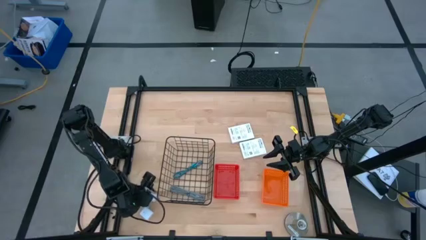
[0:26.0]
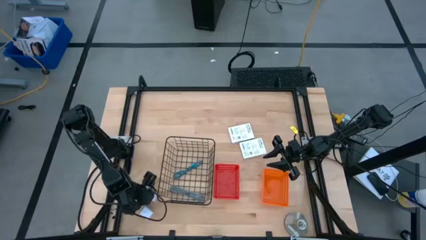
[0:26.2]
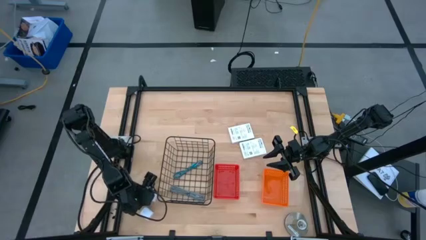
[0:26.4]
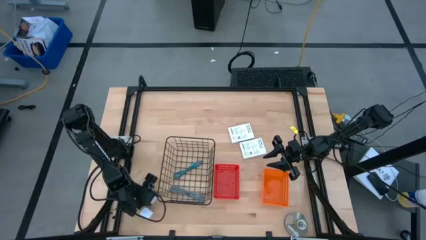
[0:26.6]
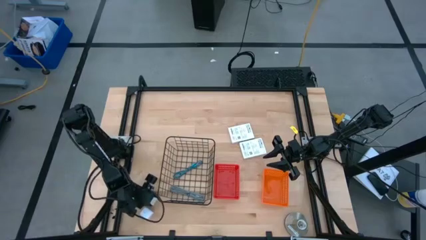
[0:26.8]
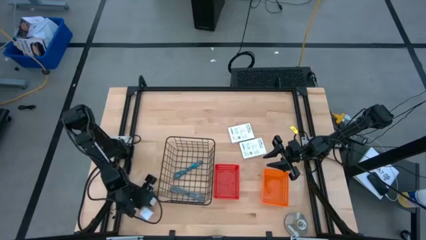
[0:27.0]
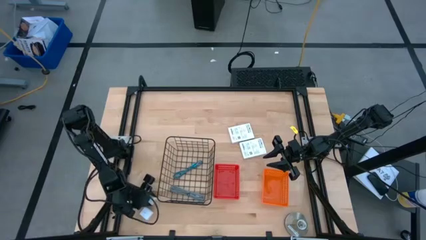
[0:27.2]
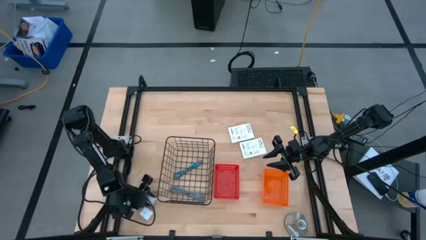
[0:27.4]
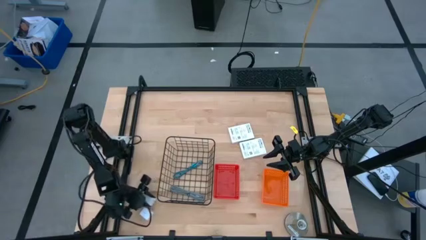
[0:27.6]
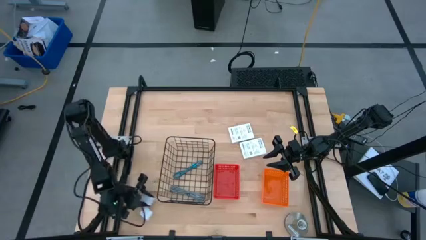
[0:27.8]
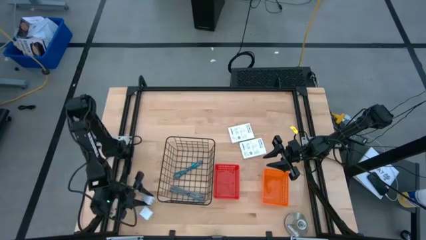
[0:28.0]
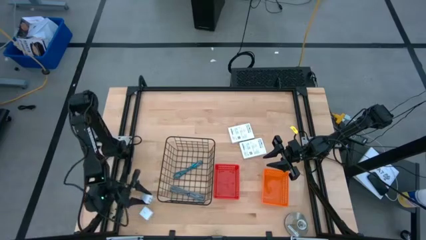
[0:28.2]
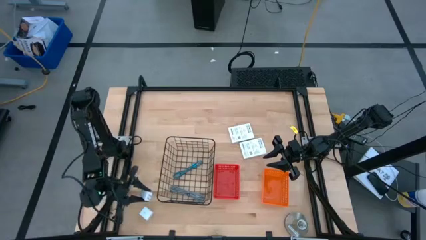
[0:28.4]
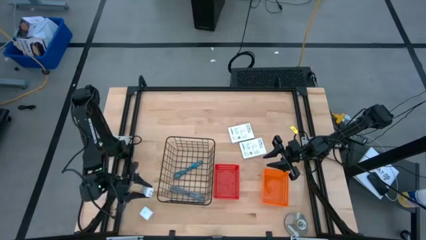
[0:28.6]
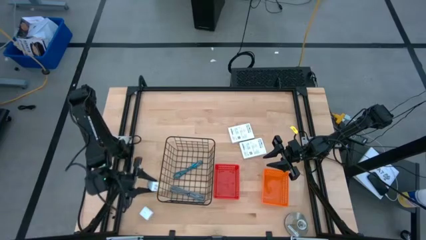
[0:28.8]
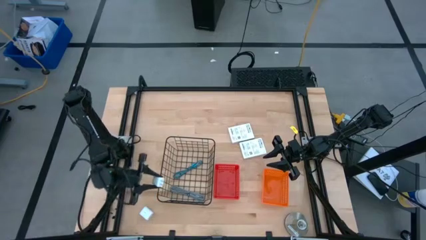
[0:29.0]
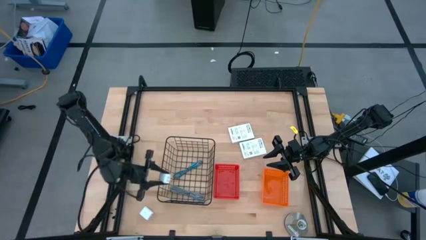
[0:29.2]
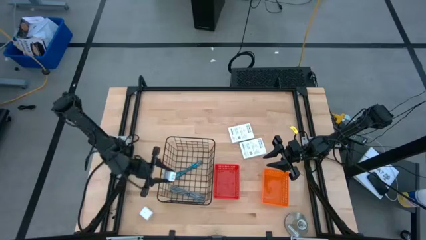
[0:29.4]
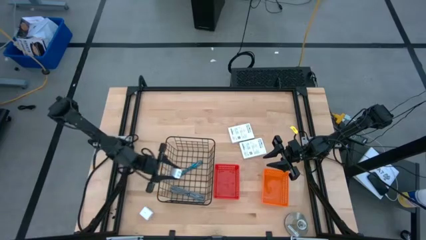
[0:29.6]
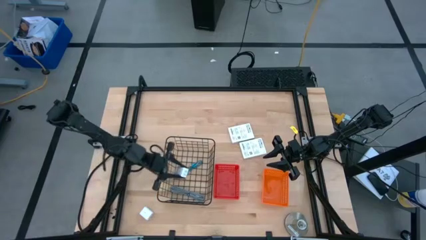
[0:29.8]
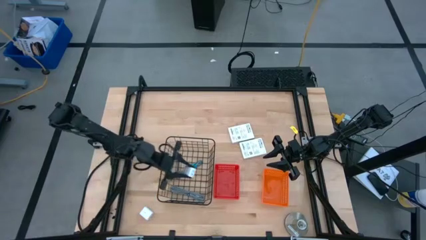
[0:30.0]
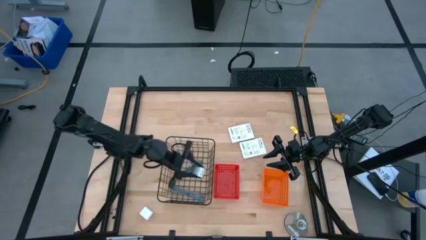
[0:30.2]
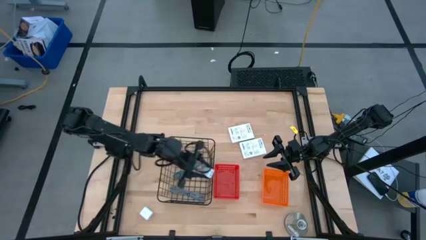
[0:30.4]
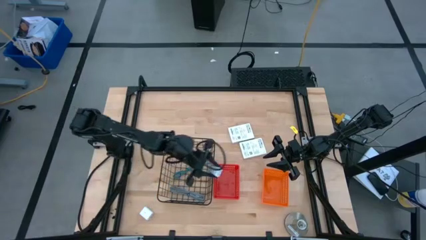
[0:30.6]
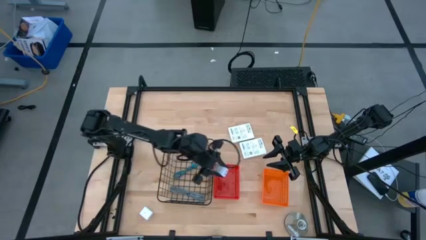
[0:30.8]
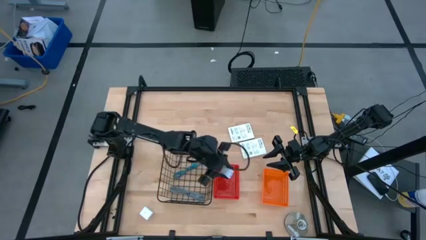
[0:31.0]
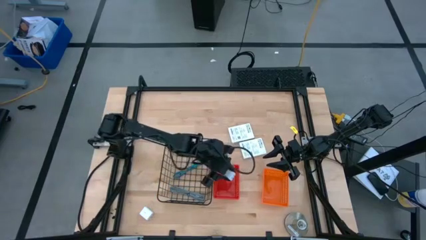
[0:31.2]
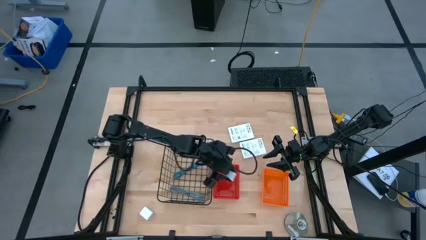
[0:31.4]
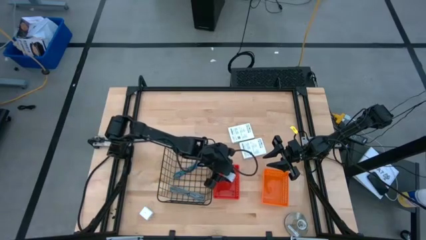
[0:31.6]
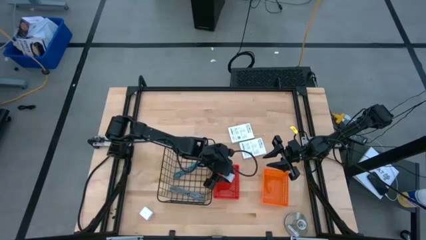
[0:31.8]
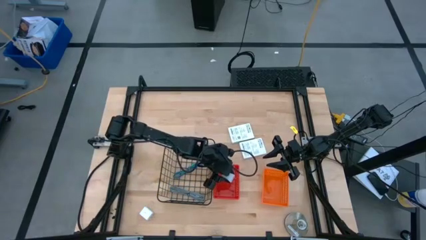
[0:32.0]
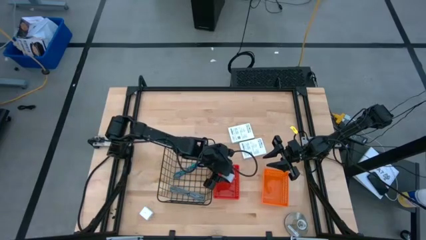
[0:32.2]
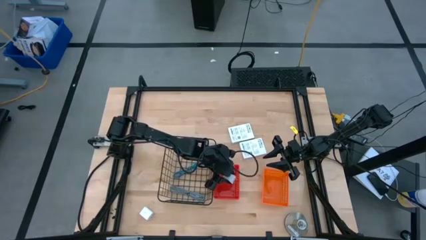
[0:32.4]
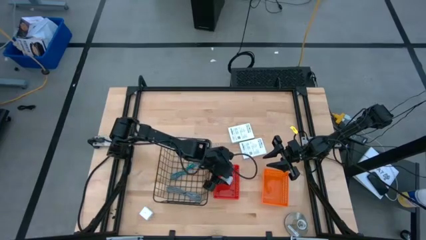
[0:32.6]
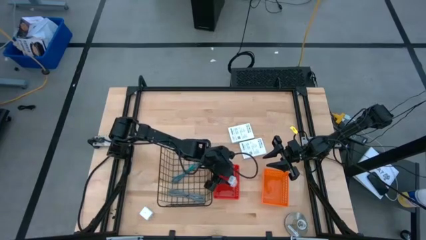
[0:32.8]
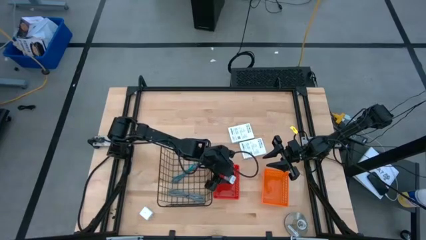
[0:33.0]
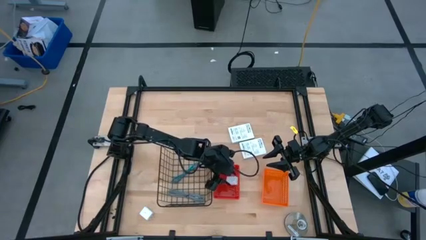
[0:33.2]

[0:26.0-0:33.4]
Task: Pick and place items into bin
Put the top white charger adapter into the red basket

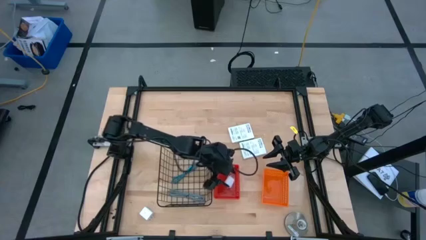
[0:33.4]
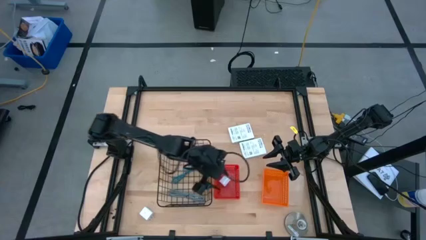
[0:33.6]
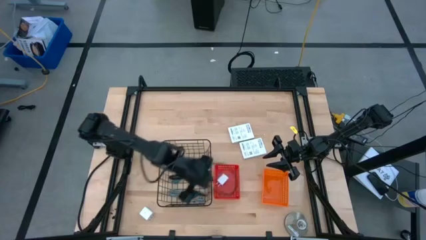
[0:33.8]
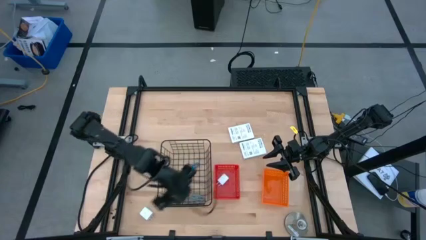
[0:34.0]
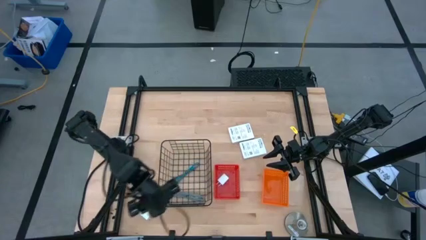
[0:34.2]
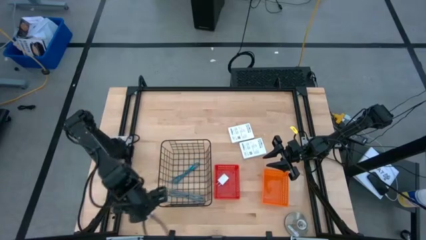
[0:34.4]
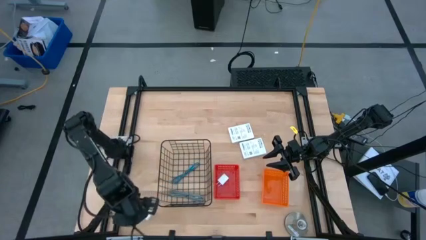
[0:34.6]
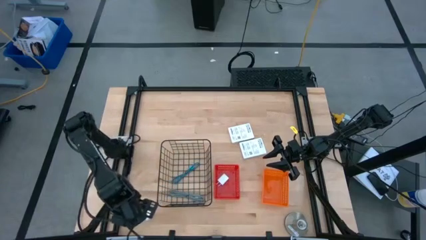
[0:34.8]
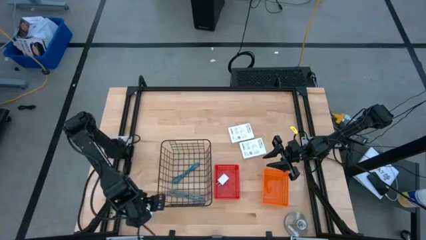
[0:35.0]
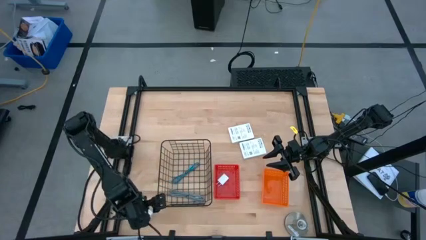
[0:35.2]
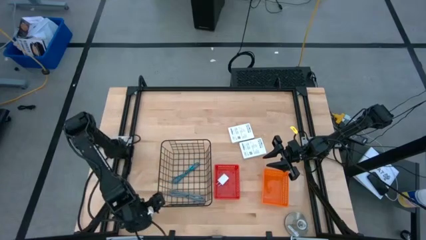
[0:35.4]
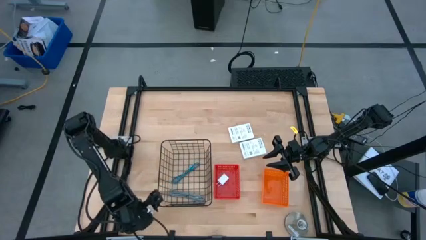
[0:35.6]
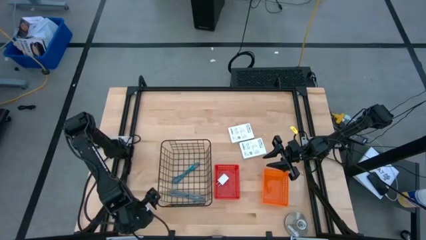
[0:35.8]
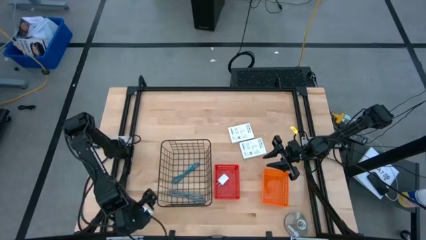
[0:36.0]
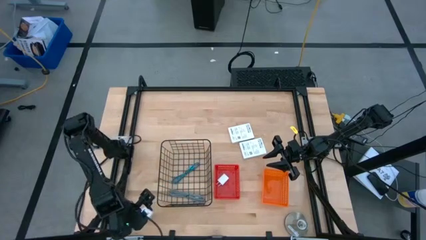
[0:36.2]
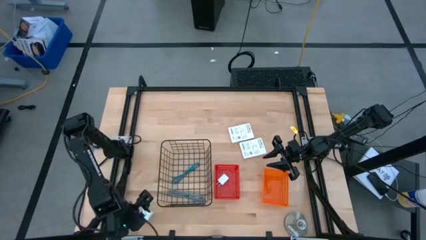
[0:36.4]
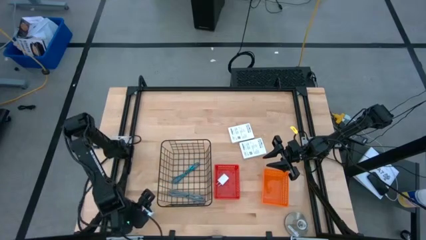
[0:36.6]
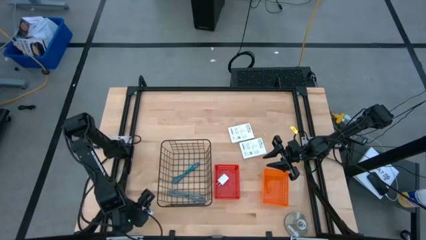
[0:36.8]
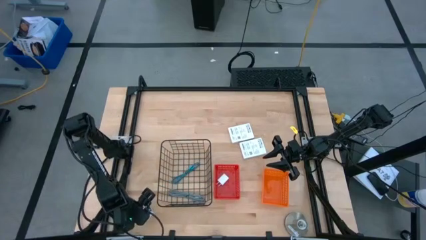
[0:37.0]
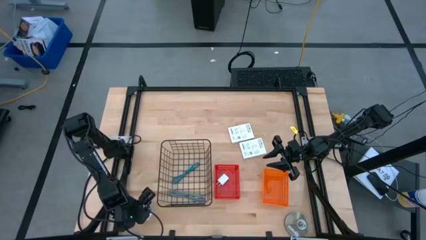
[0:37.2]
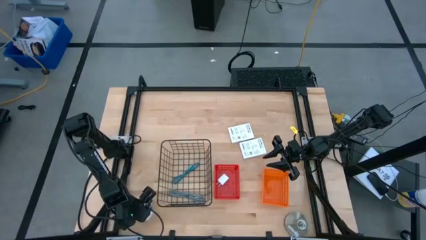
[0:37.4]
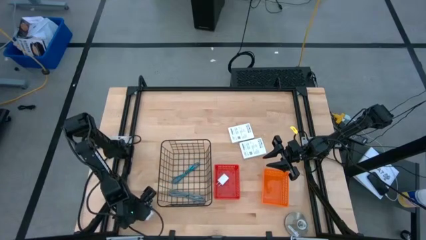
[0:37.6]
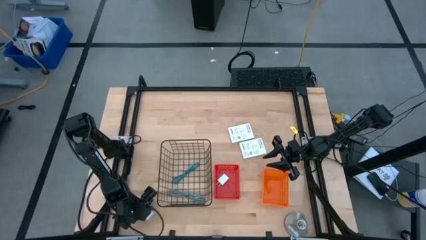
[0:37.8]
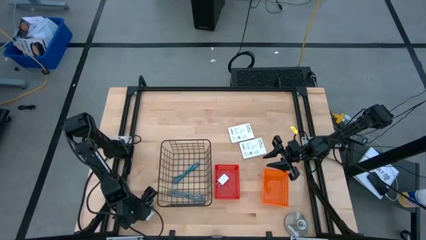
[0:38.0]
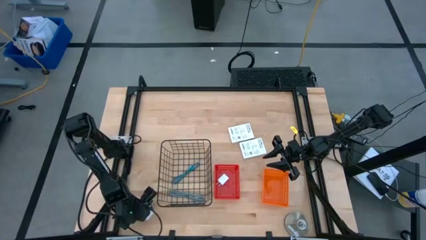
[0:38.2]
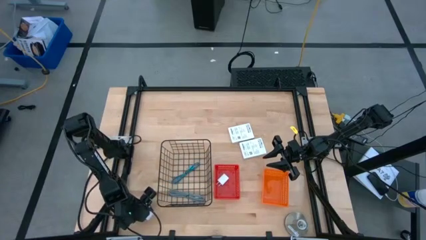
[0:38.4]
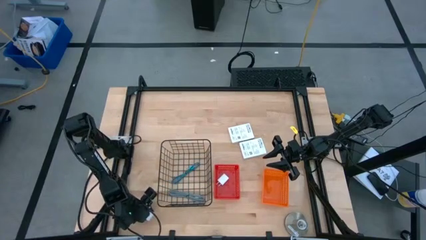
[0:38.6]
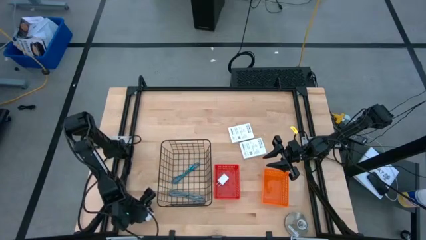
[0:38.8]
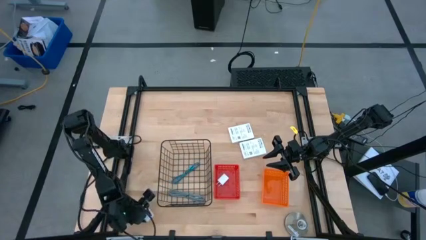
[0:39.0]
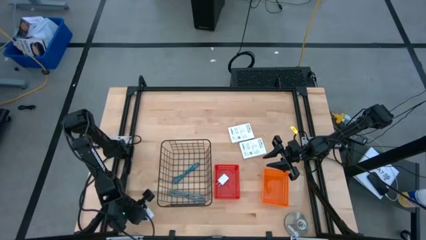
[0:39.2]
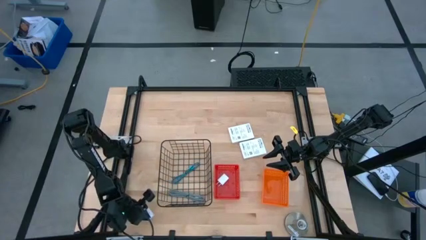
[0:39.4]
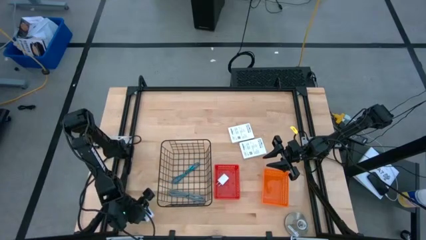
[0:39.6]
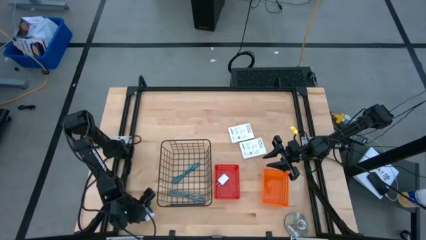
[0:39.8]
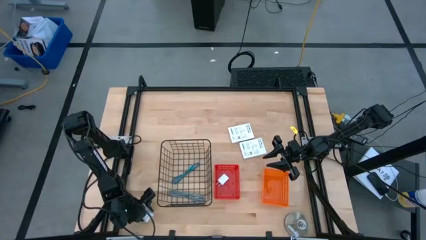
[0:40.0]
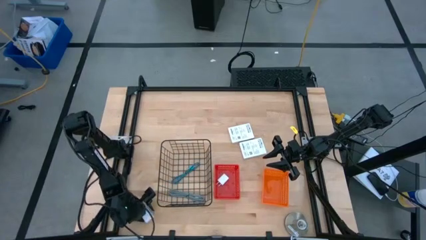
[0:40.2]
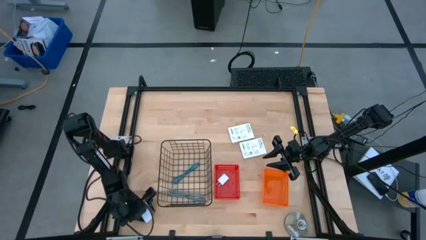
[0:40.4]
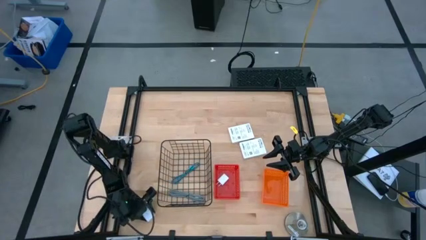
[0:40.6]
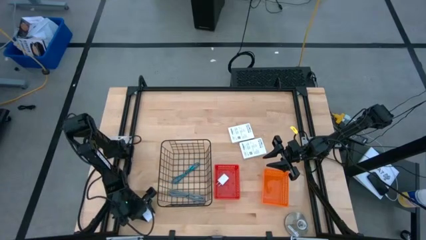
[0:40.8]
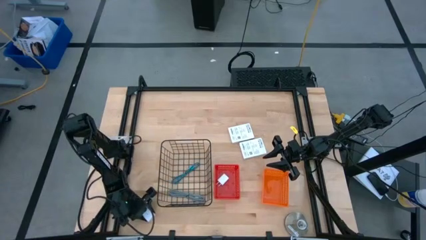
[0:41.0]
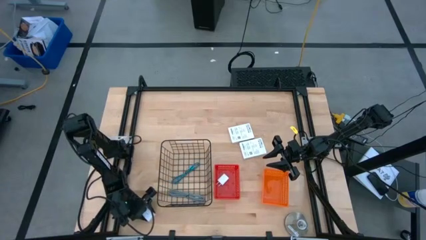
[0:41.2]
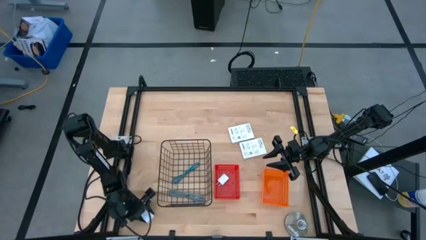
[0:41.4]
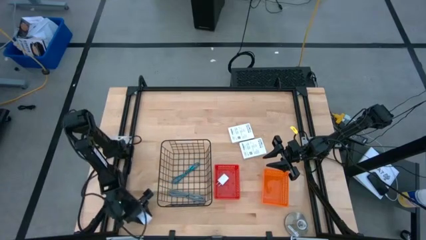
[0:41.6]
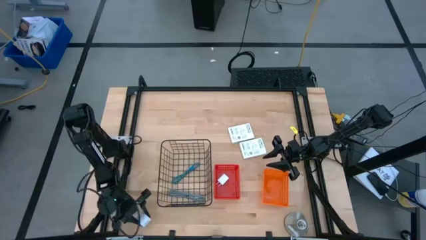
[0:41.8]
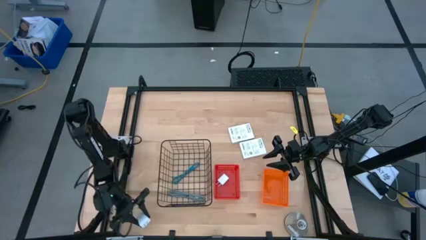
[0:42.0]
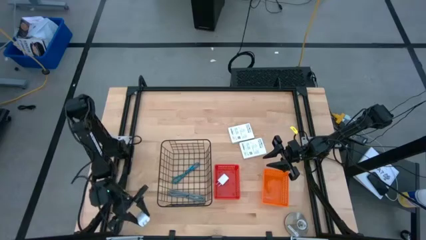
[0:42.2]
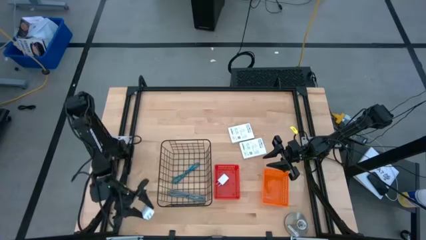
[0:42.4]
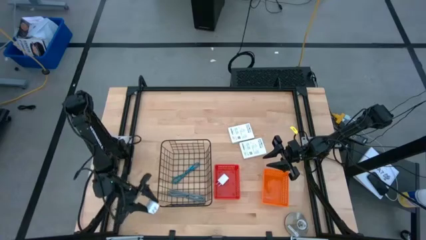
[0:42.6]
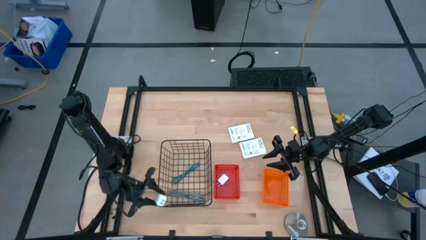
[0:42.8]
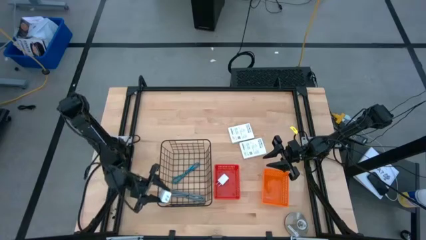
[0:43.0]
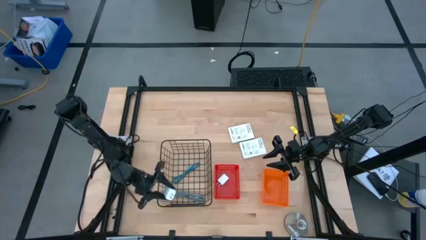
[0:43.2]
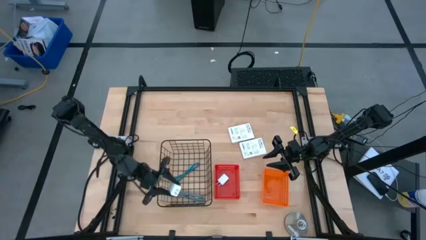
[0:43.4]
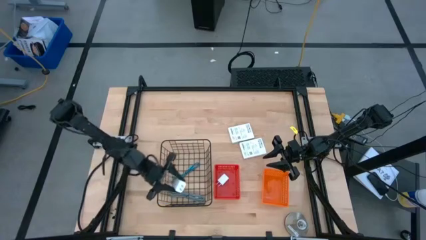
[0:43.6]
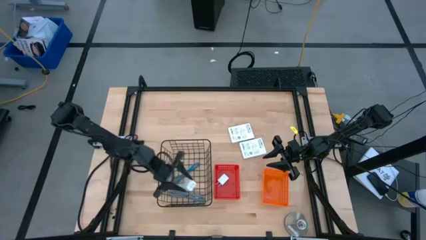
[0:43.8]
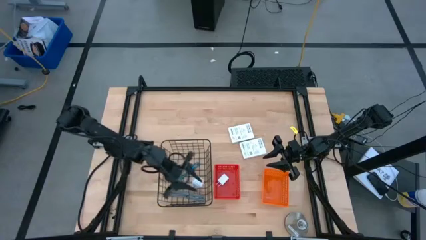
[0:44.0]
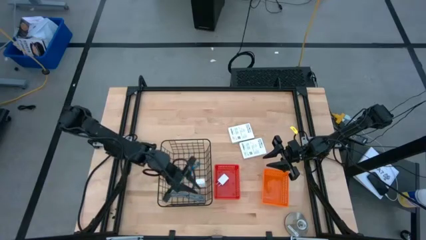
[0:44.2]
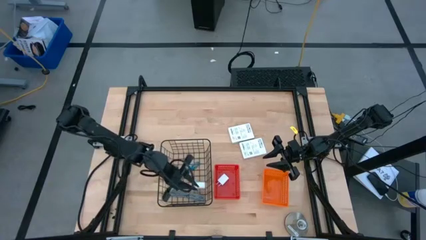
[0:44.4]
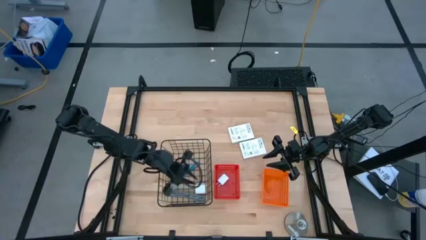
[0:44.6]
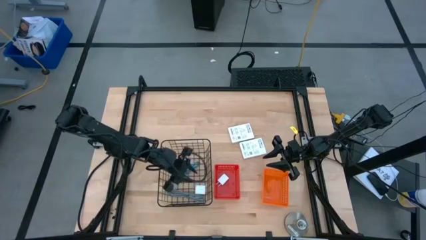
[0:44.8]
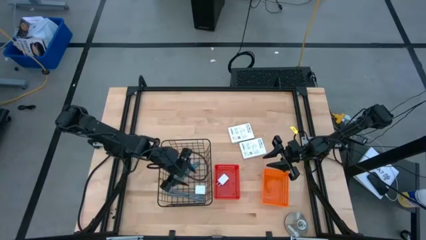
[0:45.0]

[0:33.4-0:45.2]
Put the white charger adapter into the red basket
